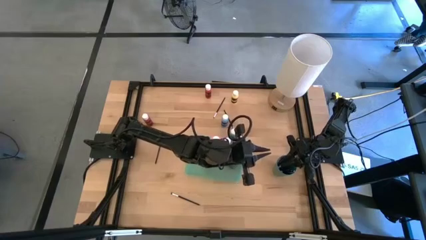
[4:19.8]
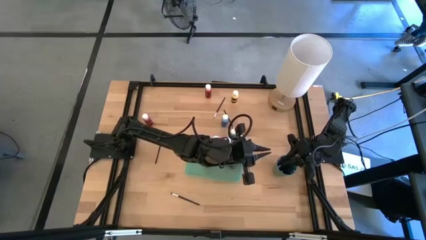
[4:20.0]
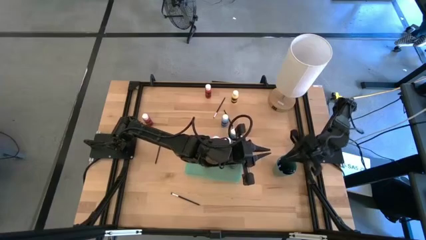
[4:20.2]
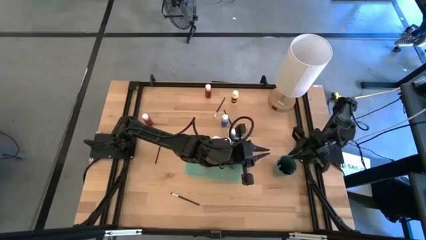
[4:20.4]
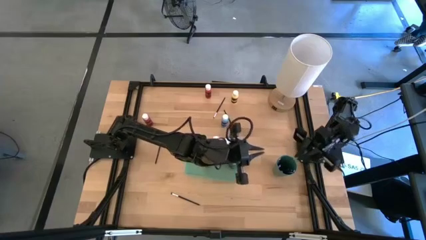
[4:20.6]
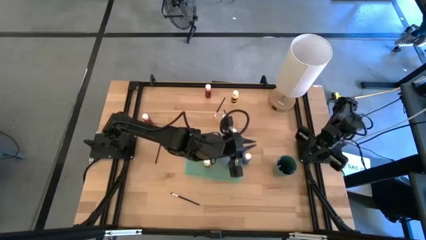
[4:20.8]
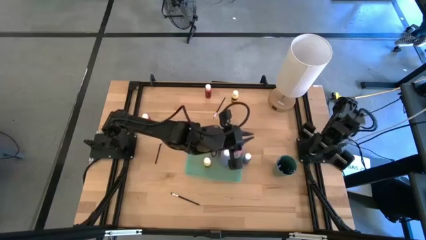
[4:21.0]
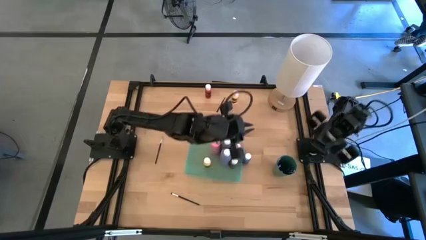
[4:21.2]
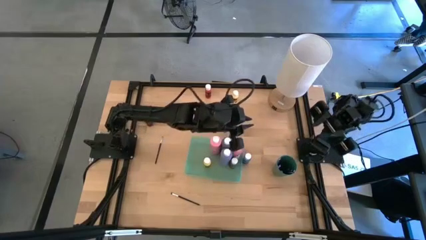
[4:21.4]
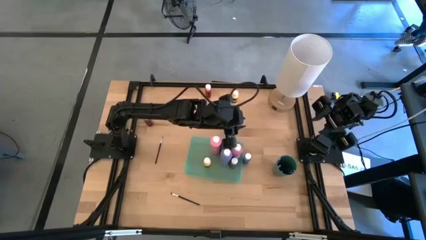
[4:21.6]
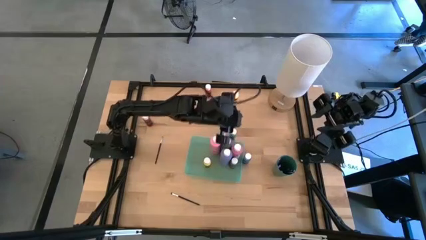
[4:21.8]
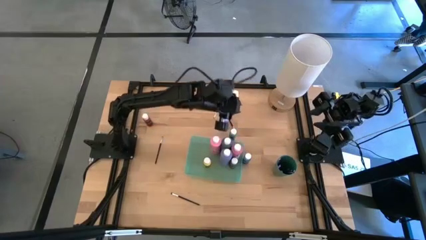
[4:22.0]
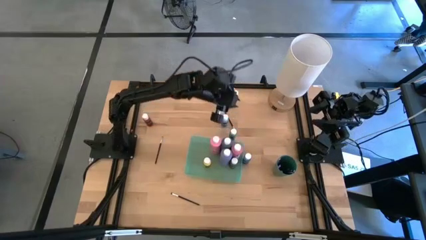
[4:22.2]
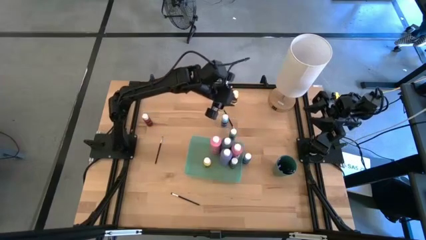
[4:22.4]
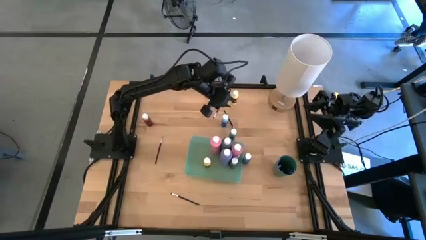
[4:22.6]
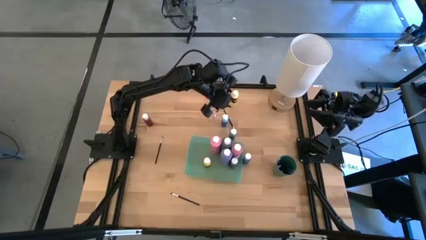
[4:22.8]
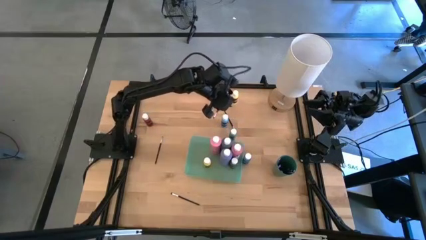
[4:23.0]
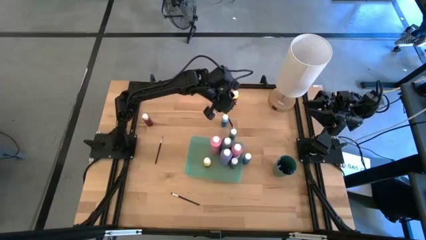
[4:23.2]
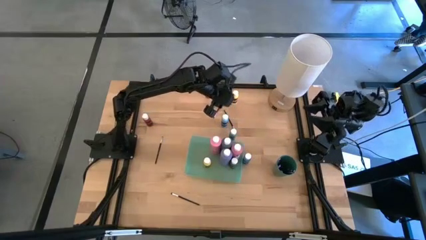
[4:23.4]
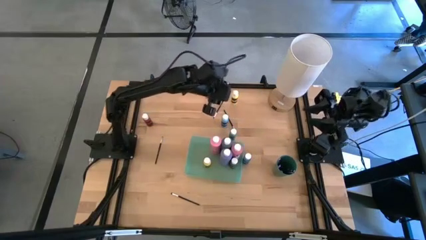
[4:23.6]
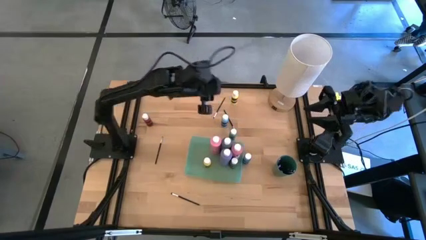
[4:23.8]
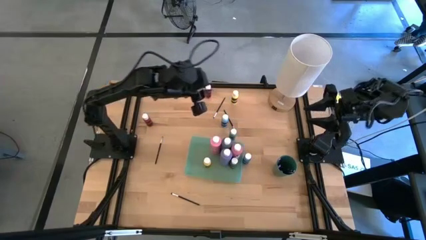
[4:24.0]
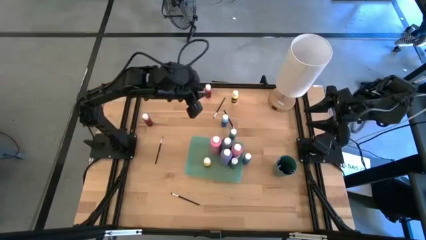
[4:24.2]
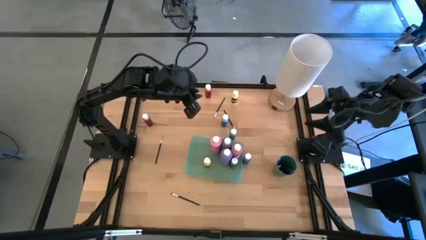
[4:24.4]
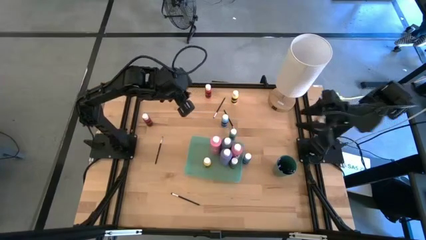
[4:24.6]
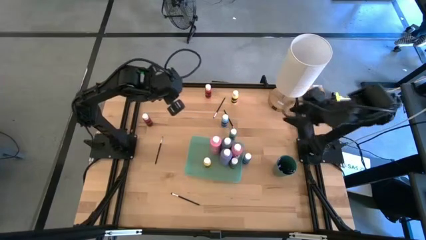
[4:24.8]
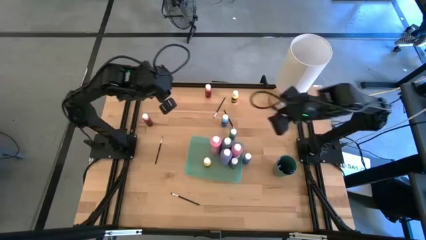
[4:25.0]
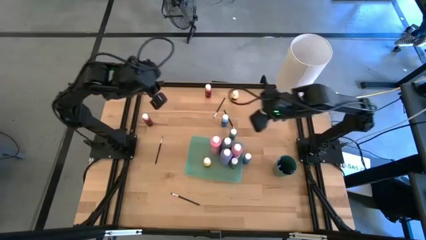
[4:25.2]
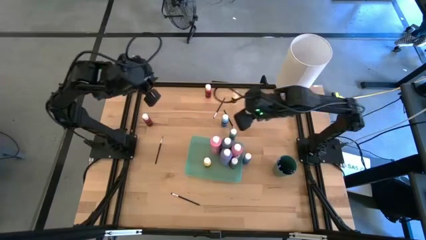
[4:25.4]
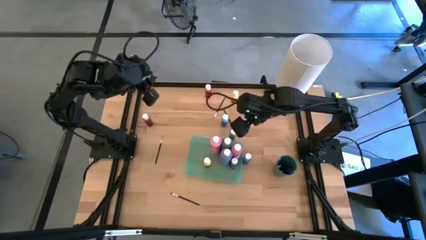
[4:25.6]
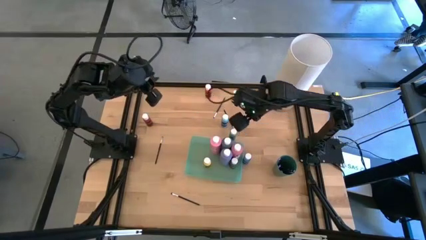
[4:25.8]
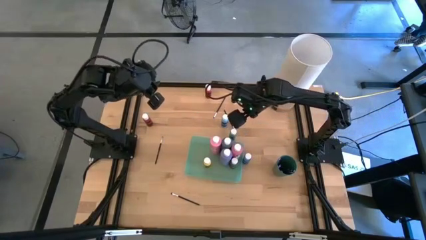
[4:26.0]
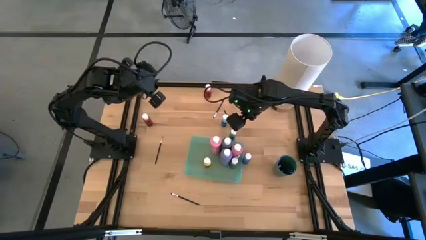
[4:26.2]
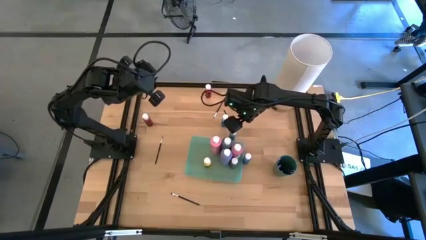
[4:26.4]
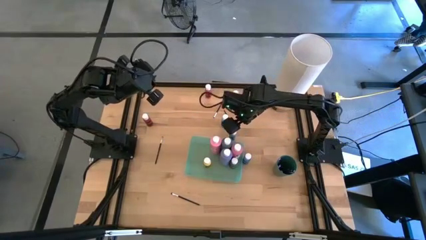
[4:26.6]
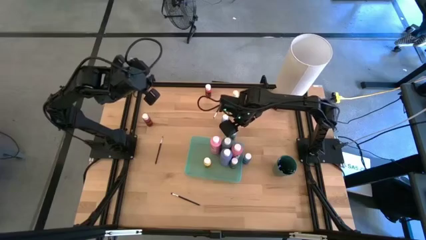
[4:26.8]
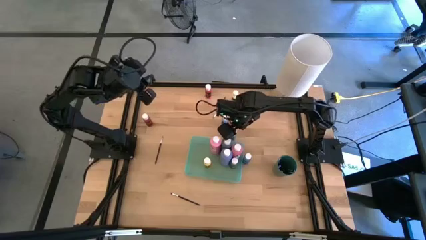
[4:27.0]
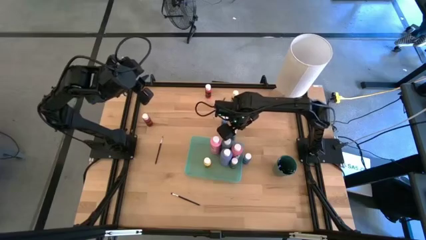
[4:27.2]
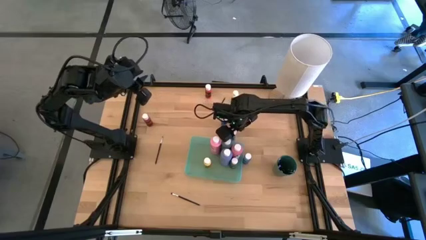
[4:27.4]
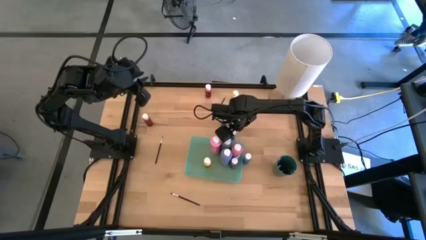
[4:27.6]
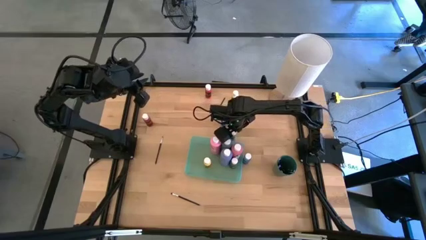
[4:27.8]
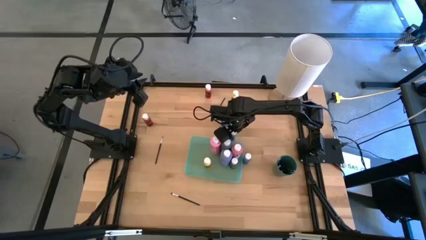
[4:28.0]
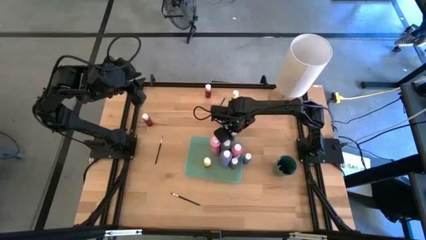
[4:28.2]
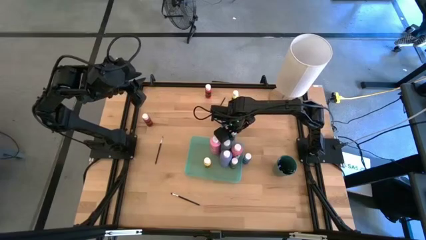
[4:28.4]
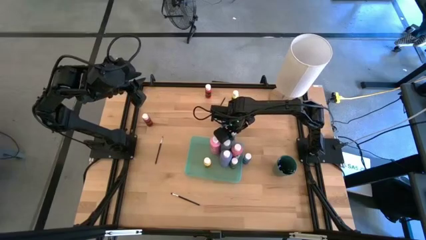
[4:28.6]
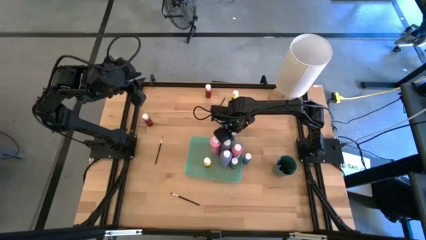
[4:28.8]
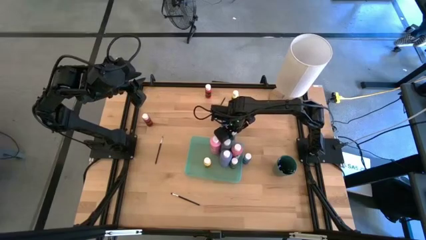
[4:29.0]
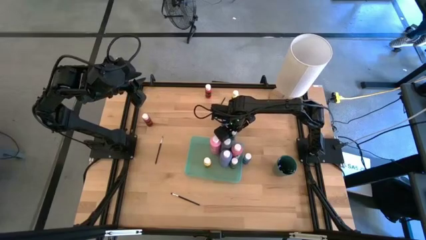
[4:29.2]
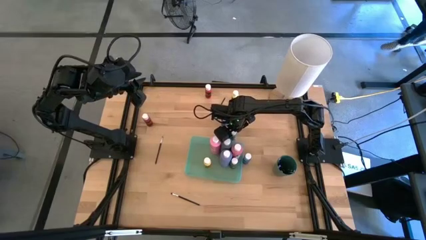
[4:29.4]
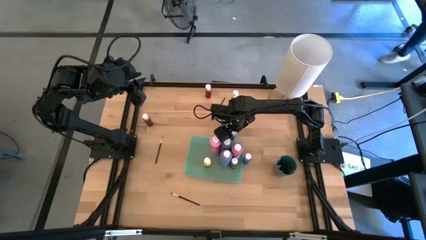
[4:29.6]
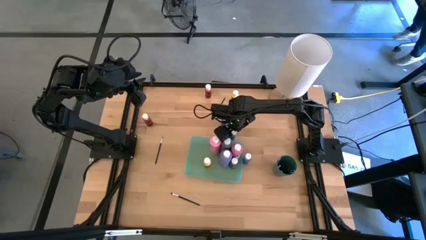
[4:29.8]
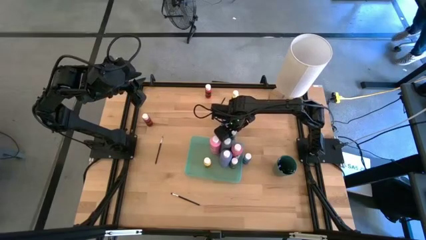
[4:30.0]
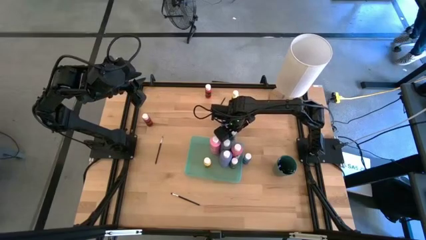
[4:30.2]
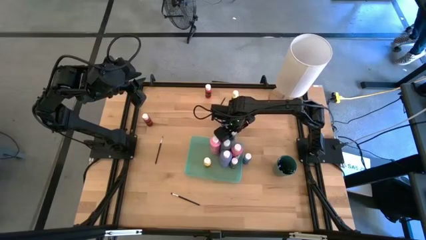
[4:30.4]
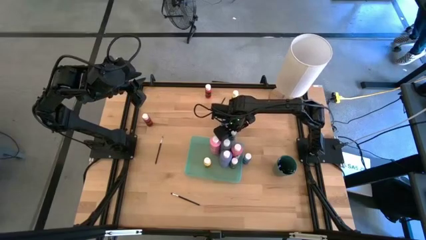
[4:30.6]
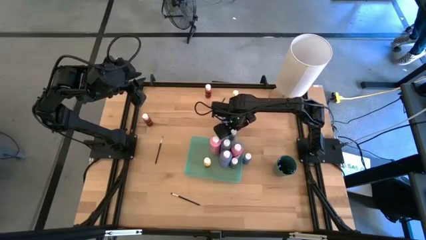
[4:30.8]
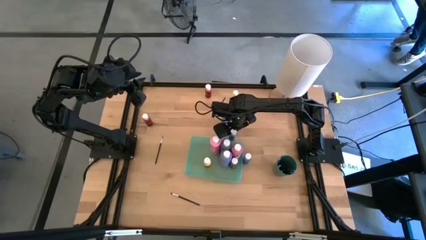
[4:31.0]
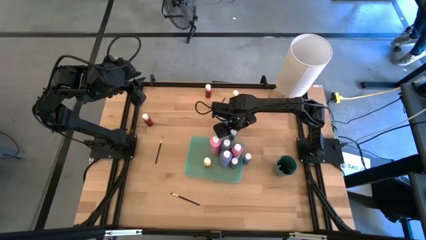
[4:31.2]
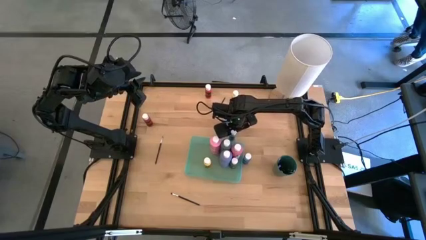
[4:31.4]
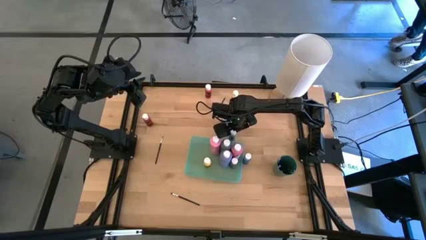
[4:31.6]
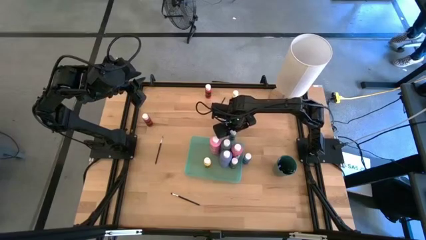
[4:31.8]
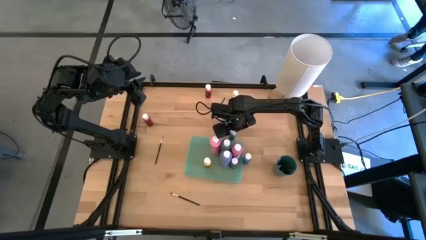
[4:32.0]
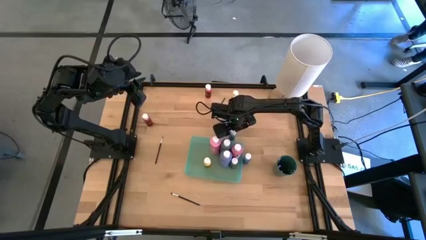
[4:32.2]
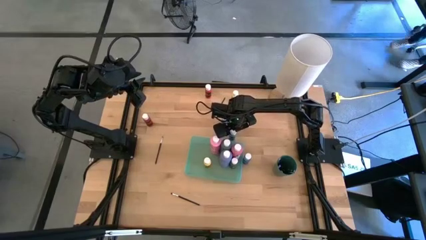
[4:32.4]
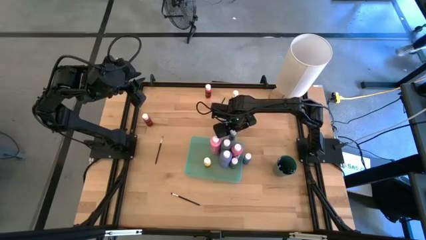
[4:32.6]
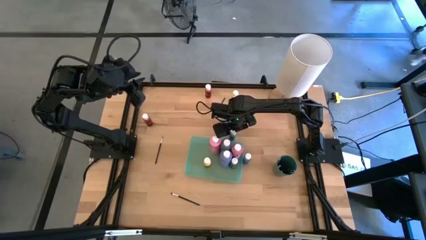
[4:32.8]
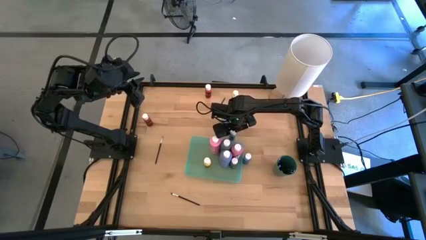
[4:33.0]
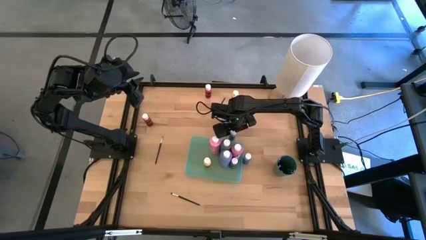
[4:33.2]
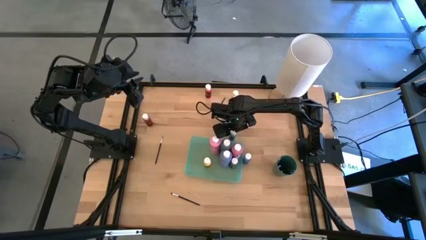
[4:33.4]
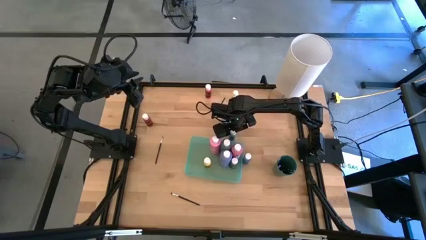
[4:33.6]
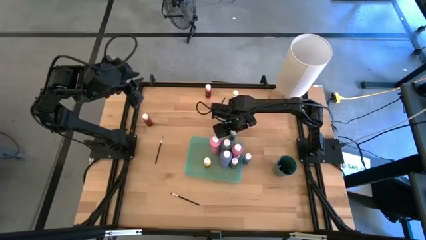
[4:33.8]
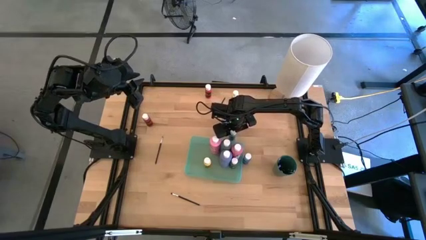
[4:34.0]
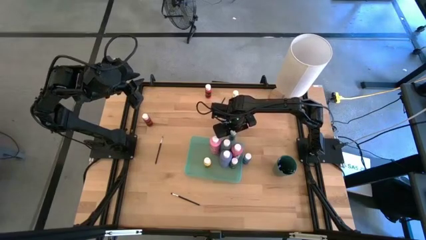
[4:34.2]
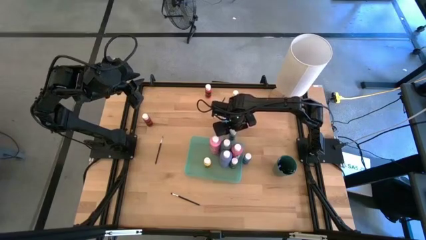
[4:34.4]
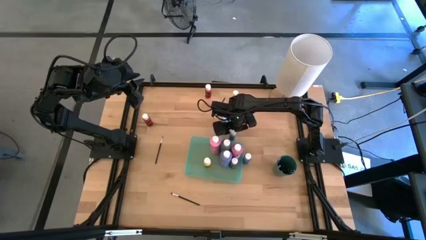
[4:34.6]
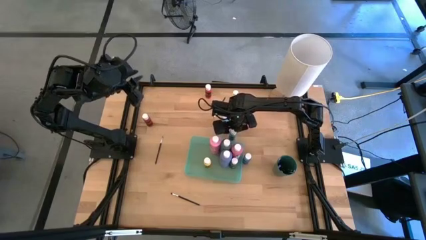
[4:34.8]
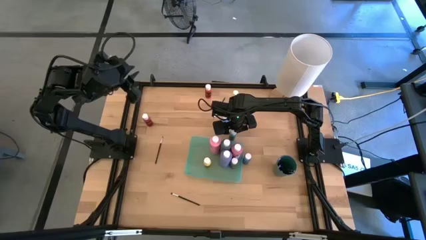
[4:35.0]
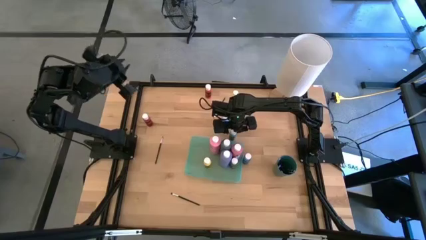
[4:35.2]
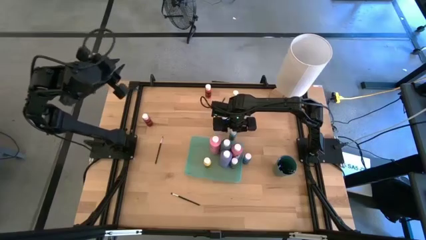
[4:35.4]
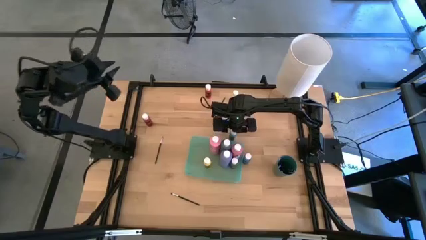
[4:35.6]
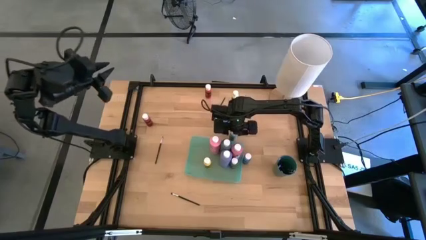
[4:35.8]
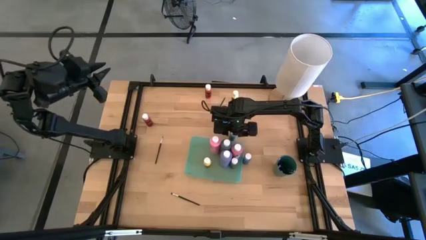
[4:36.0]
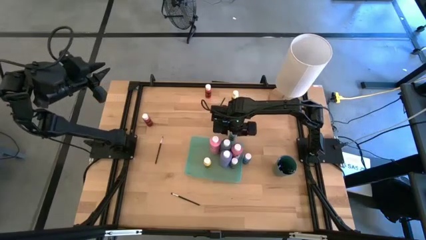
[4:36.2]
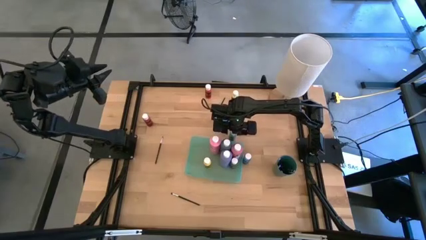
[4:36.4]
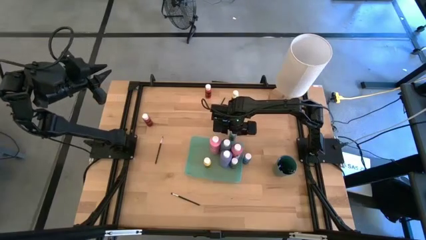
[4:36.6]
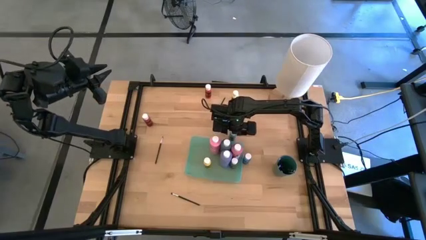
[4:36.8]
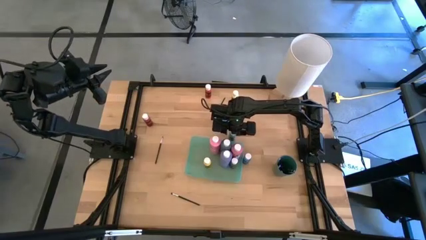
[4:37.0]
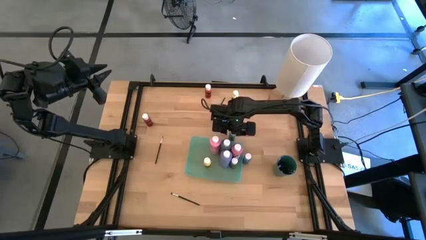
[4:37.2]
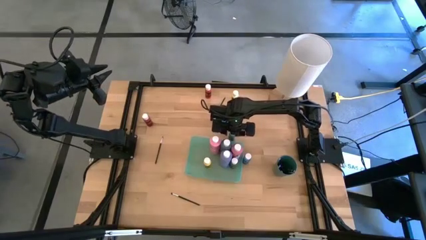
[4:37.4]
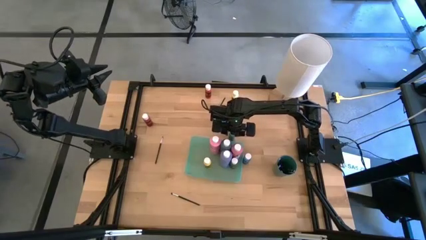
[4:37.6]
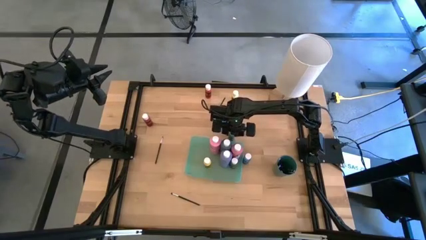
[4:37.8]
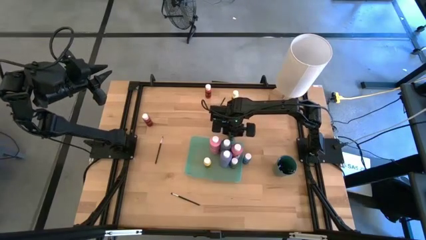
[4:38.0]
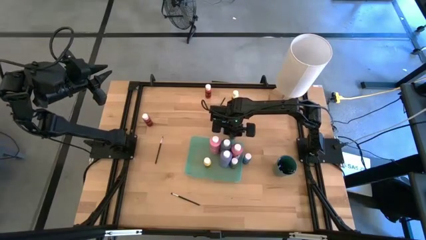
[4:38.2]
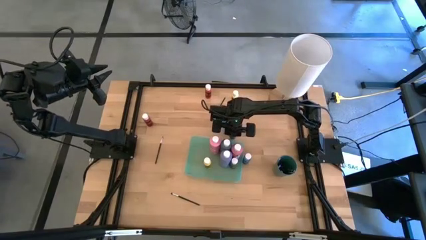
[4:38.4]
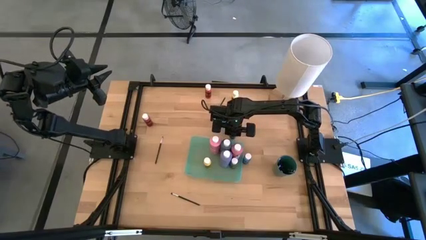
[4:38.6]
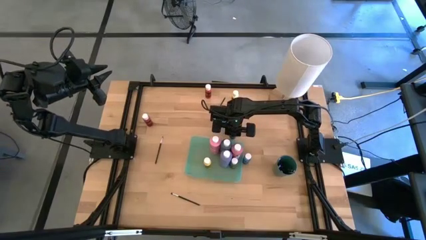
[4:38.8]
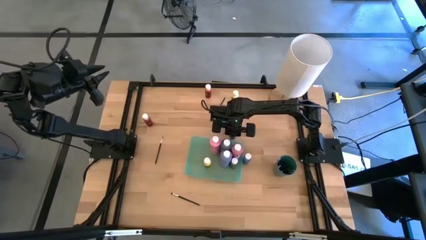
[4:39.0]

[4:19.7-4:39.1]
Task: Pick & Place Paint Supplies
Put the green paint bottle into the light green bin
